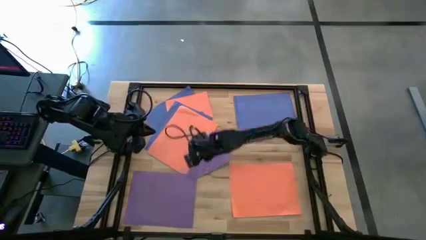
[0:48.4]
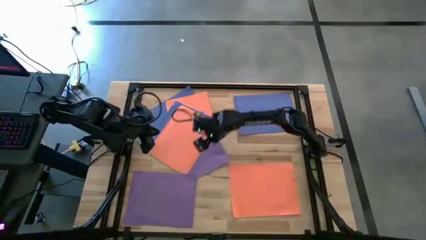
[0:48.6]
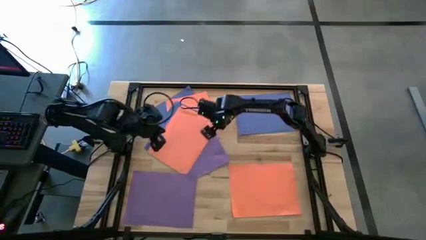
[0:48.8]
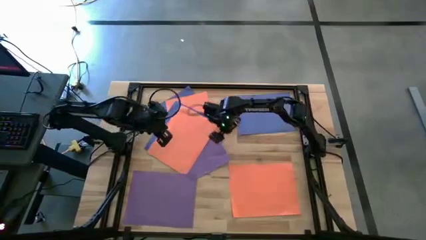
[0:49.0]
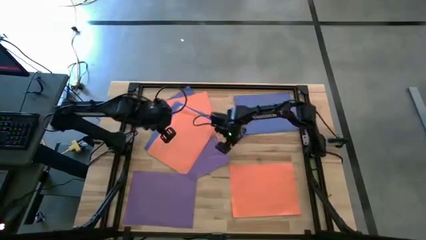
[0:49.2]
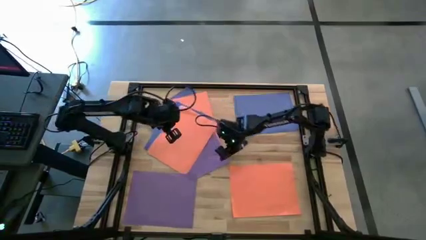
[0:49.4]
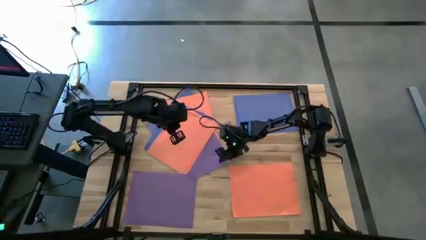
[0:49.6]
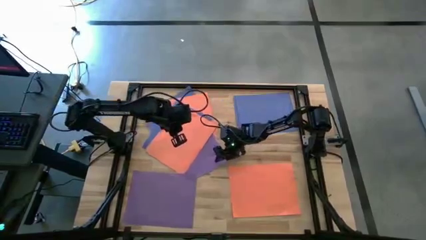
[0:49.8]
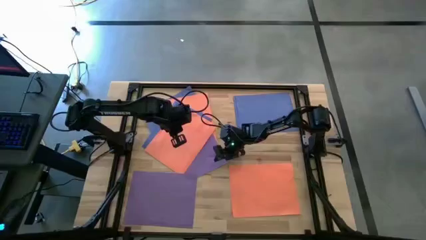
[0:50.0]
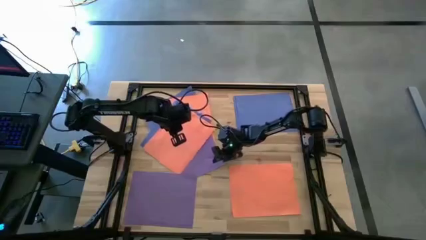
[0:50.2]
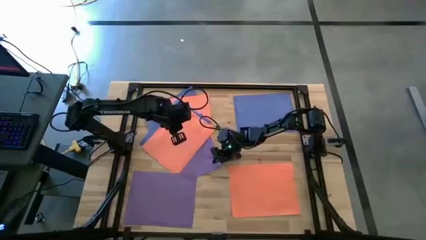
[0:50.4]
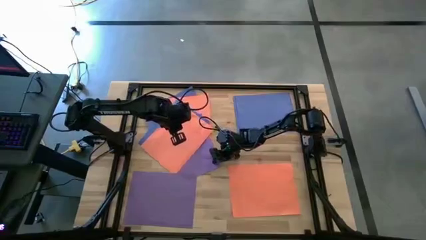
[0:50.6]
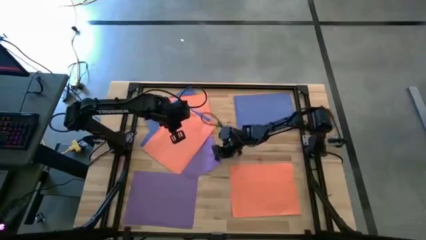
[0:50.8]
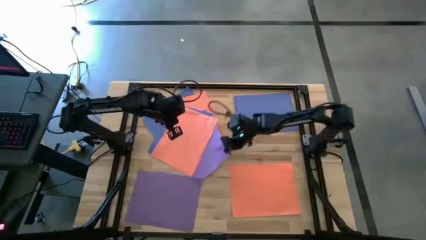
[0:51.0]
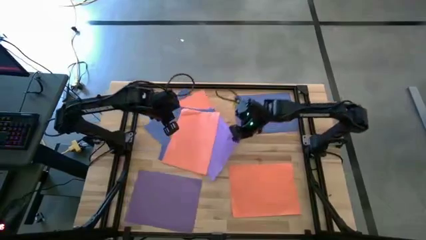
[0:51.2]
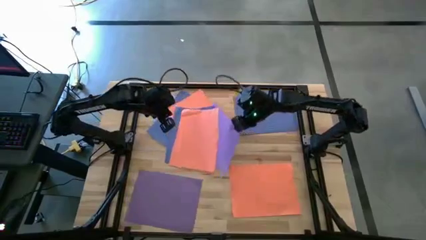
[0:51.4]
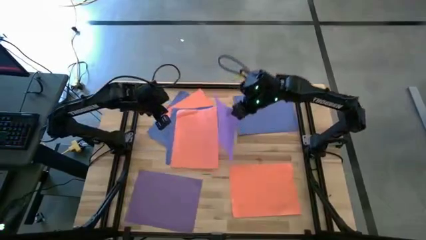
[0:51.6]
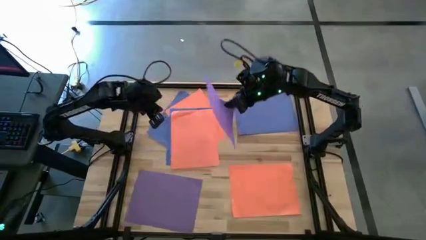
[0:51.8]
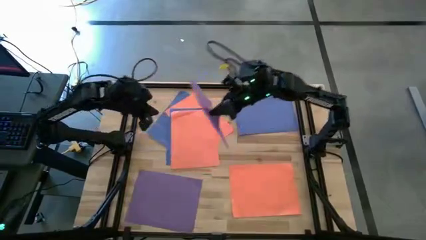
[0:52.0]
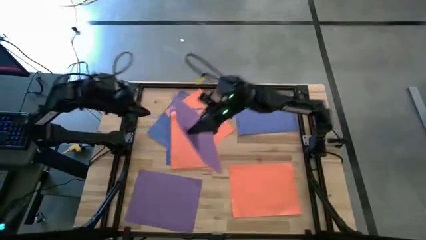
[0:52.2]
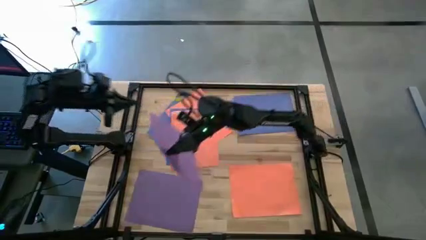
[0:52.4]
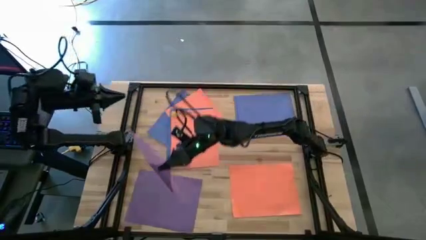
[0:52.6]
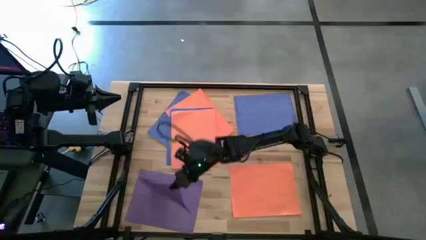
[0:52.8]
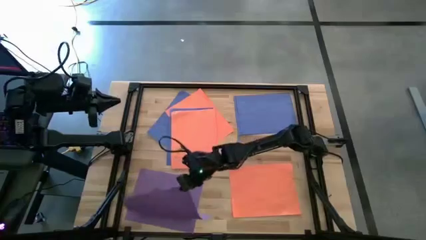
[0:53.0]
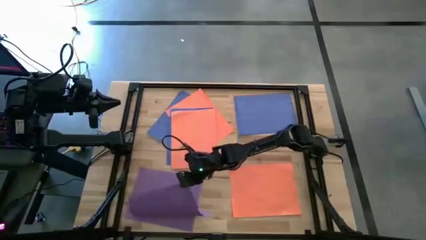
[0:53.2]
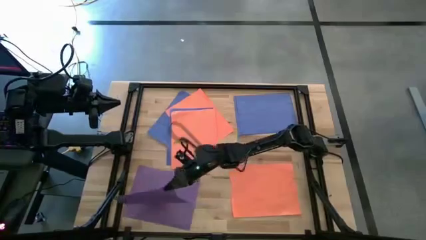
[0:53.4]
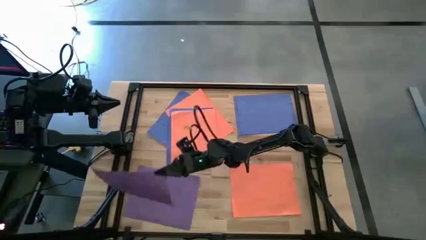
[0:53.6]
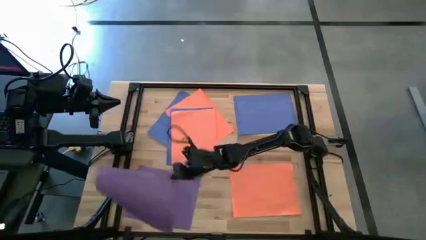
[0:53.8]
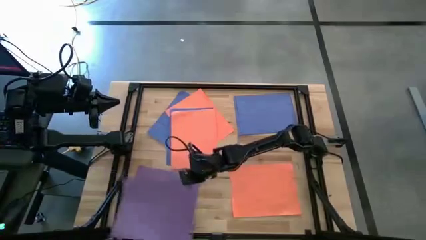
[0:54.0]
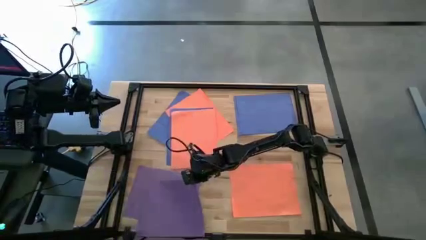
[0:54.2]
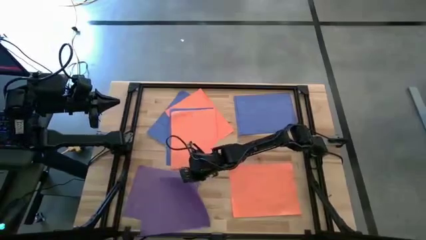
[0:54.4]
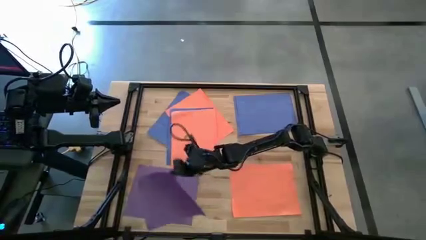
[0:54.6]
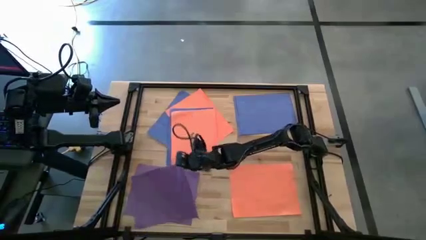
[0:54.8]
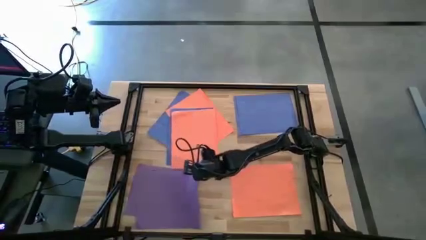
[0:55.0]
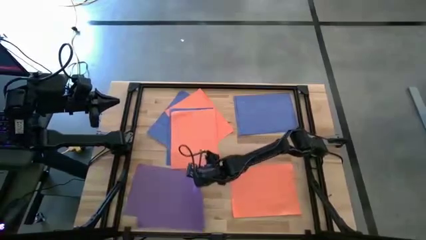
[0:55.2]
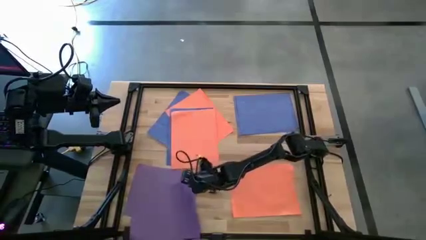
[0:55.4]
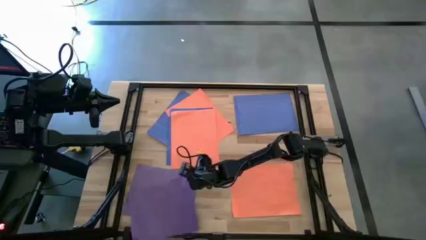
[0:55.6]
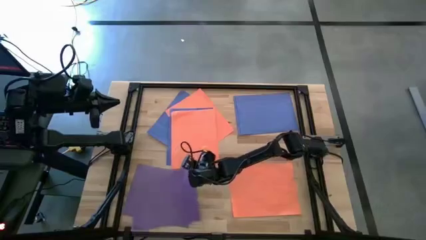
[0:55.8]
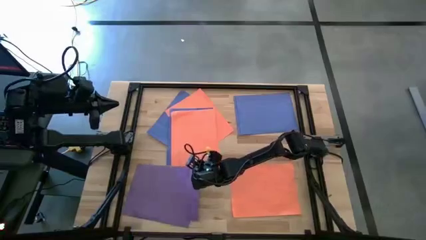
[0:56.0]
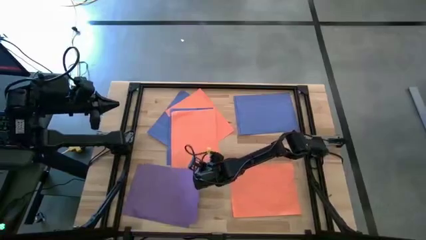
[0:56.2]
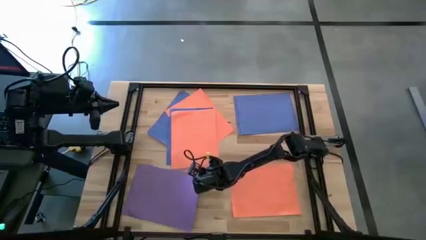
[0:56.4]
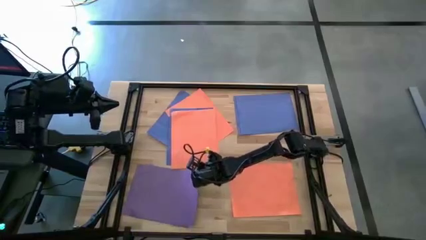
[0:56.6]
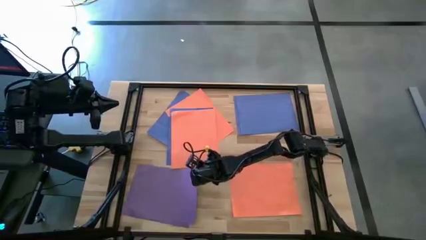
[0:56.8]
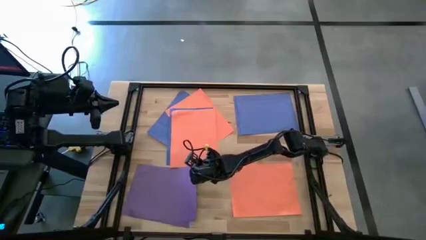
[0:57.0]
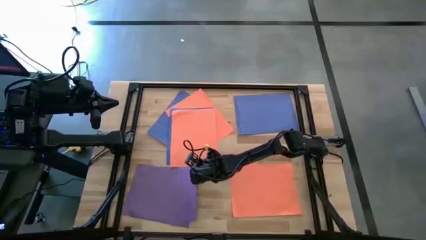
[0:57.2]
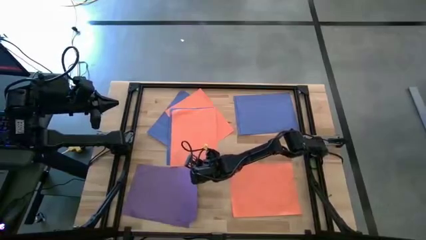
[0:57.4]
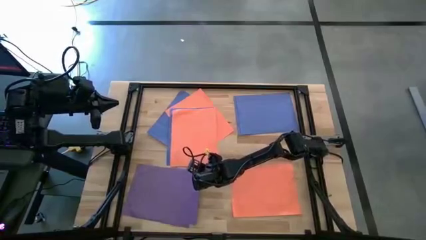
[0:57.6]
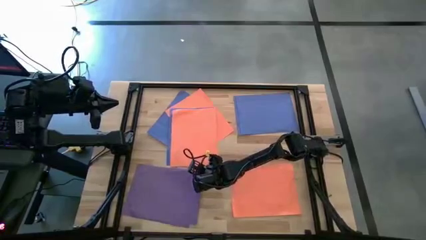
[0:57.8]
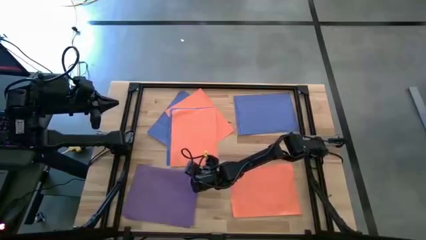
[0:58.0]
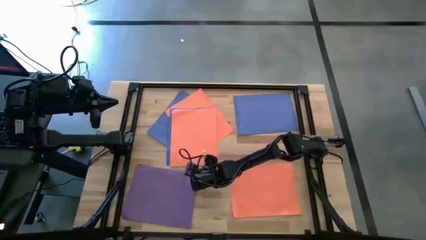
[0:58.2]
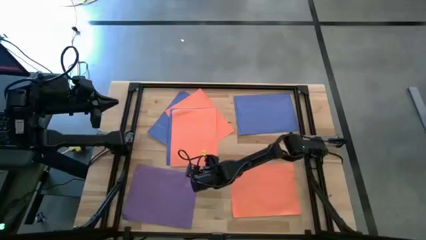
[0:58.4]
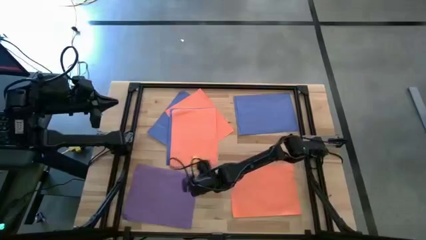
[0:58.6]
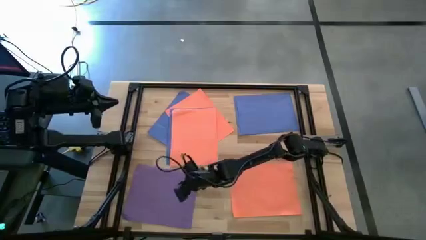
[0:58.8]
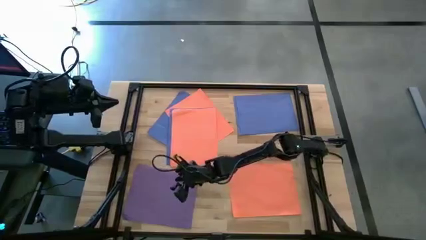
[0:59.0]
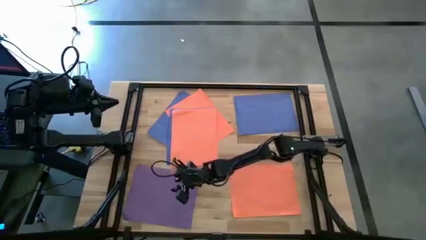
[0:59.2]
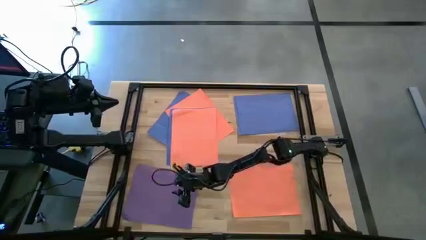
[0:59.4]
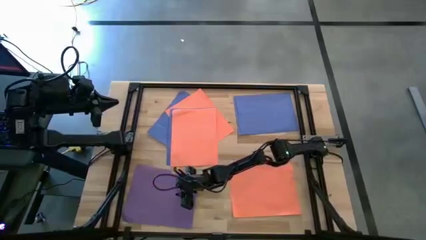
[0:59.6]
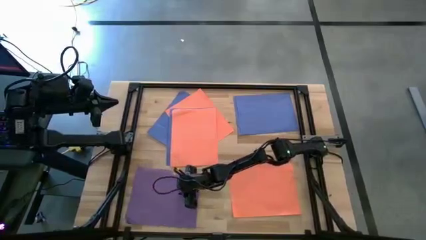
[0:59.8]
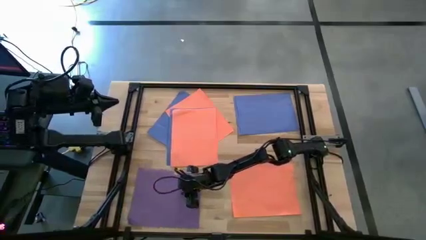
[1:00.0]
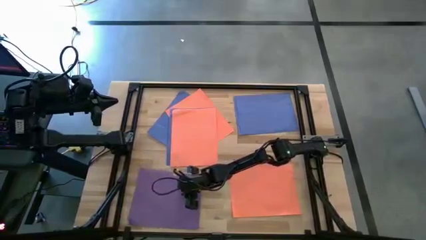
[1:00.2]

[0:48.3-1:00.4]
Task: Organize paper
Stack the purple colored paper on top of the purple colored paper

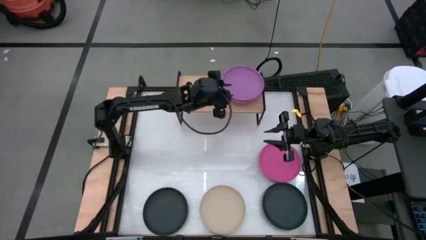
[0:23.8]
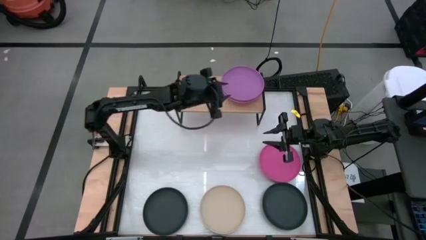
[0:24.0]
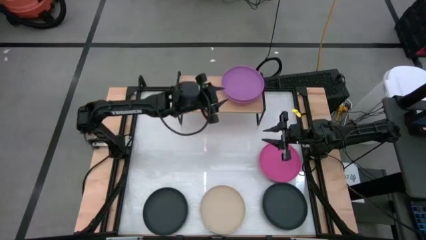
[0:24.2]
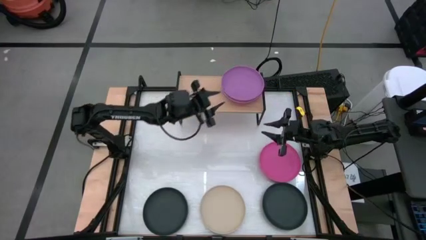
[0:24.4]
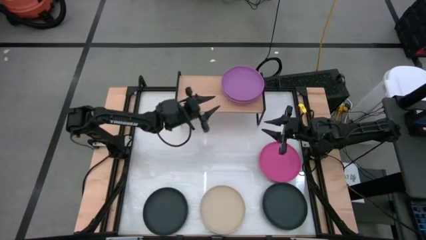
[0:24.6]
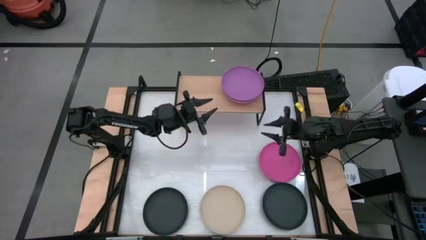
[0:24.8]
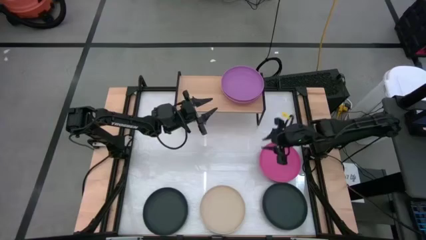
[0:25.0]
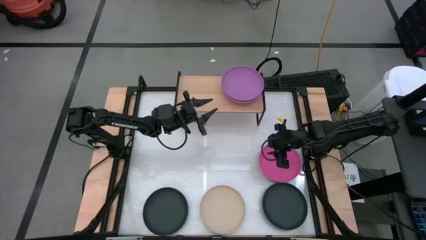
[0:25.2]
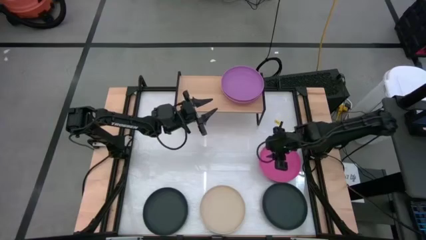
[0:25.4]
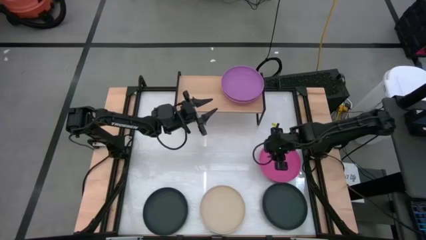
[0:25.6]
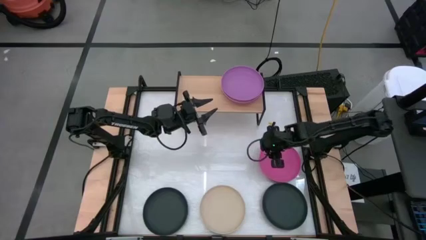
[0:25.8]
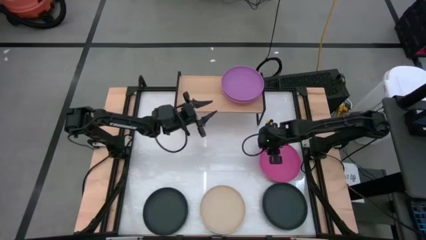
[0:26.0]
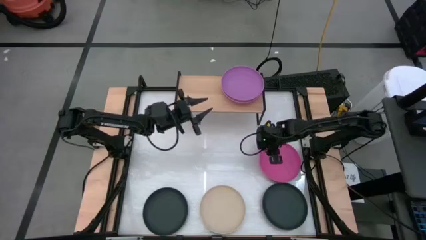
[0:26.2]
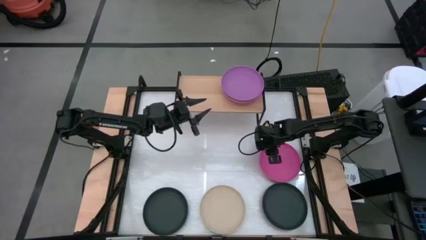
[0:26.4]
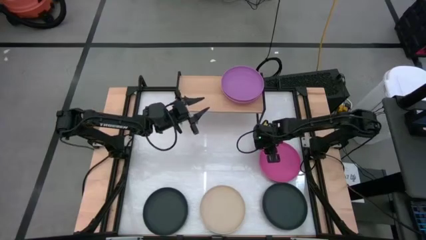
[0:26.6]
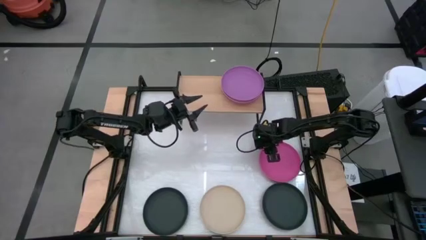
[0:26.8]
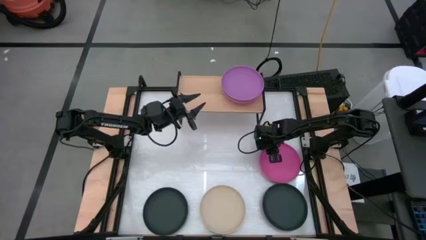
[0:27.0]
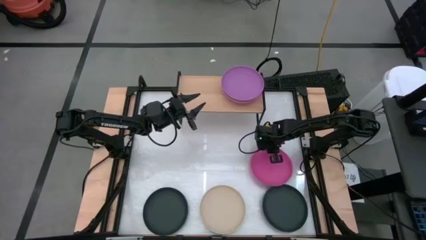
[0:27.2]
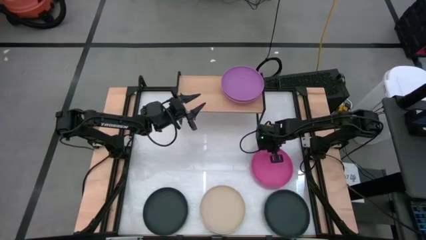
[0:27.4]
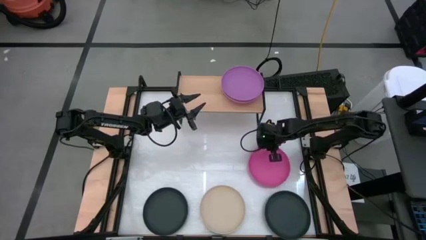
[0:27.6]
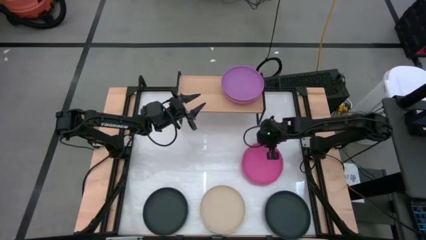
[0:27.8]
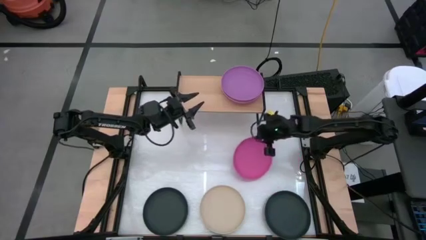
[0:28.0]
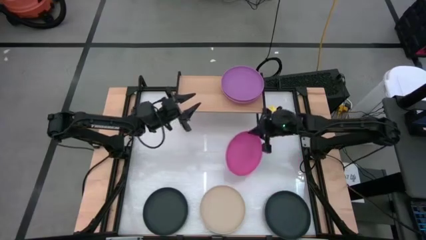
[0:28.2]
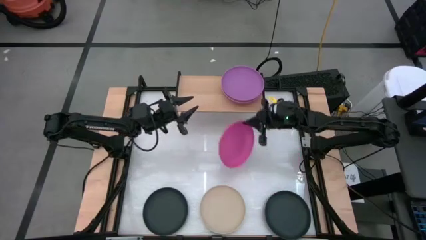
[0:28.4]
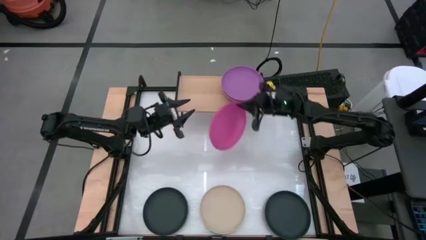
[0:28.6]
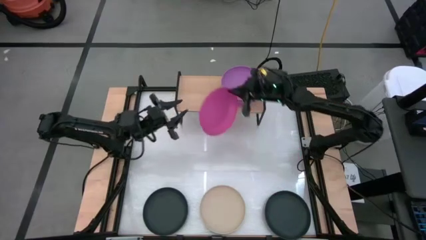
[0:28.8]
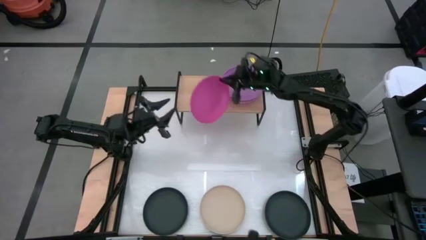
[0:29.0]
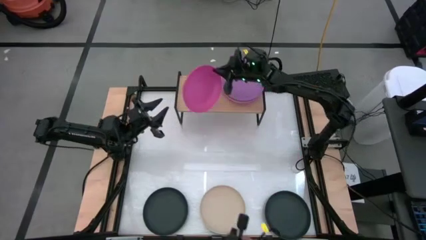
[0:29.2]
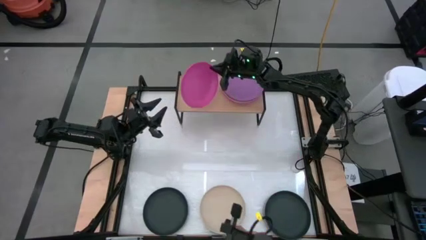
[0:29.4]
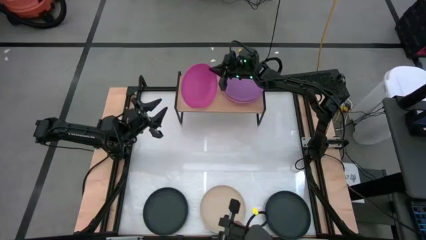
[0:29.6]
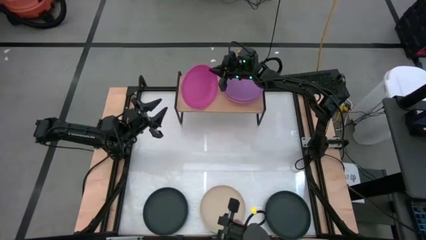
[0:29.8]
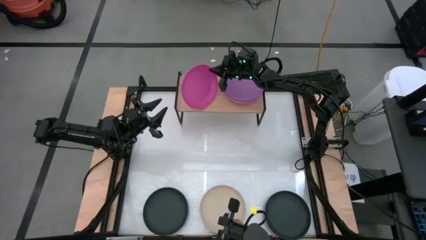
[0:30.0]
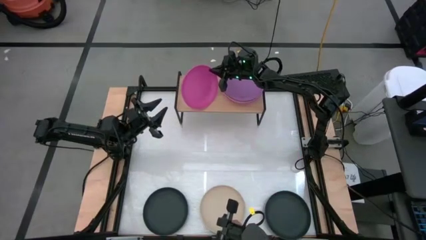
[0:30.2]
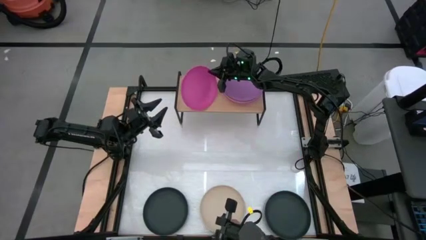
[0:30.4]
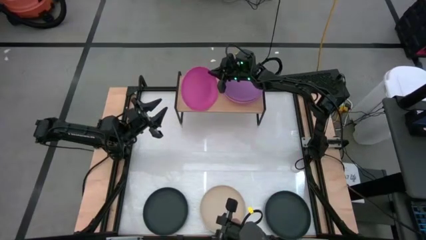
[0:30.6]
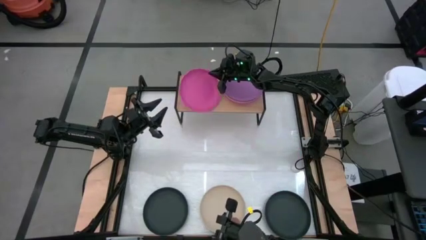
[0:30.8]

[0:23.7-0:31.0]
Task: Place and stack plates onto a shelf
Put the pink plate on the shelf
